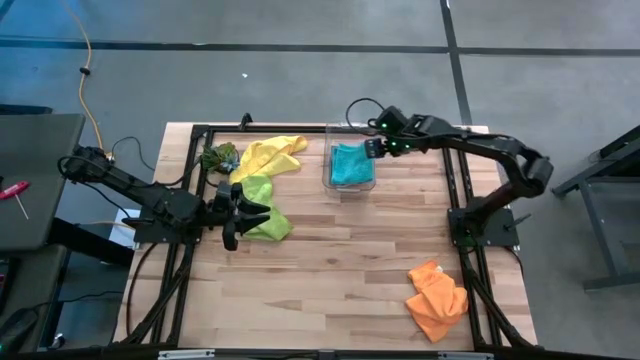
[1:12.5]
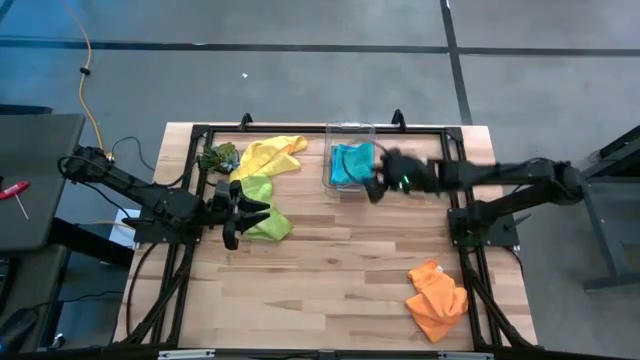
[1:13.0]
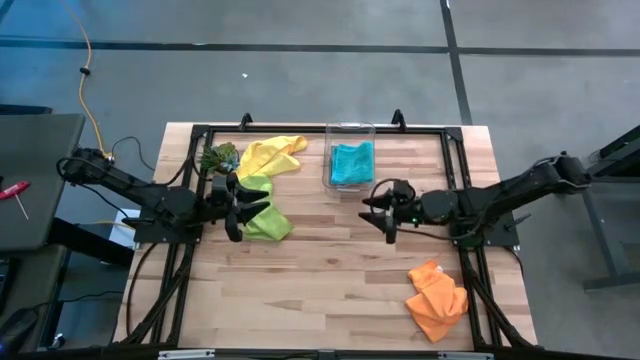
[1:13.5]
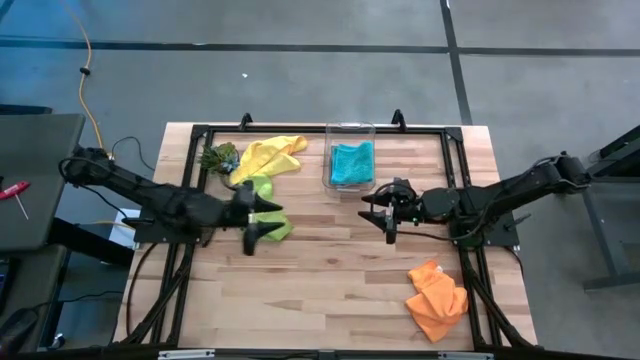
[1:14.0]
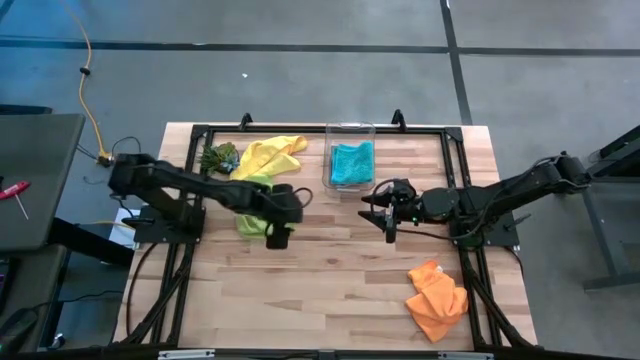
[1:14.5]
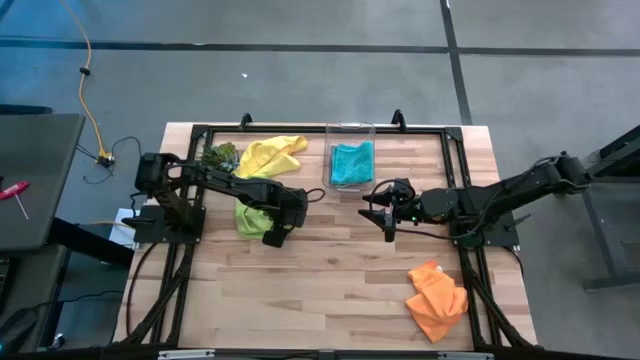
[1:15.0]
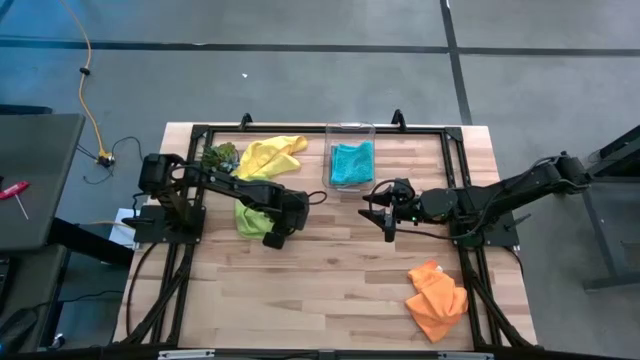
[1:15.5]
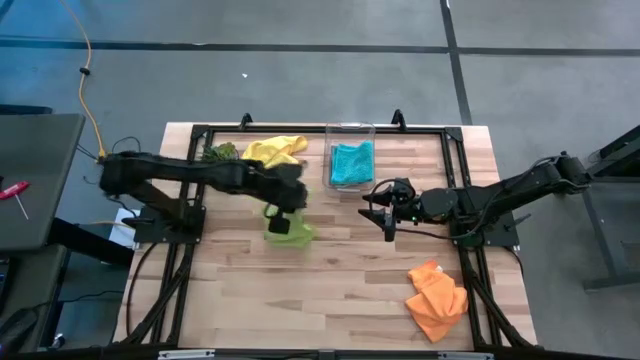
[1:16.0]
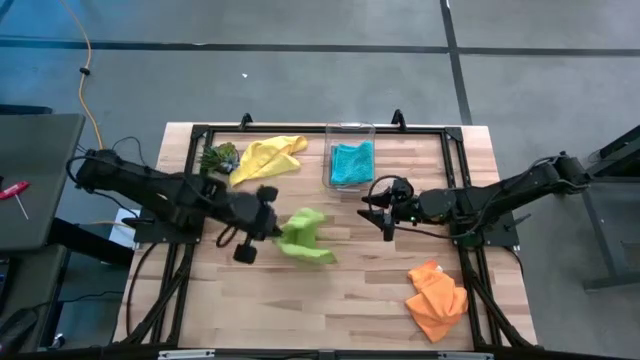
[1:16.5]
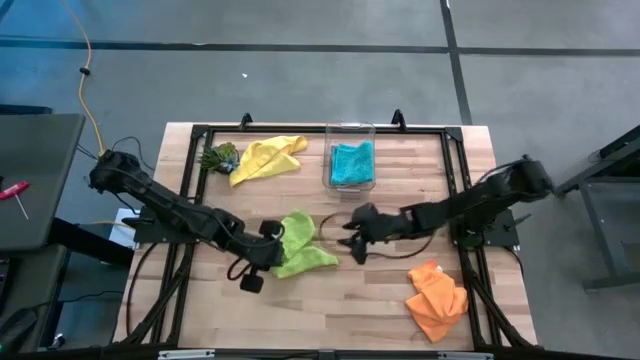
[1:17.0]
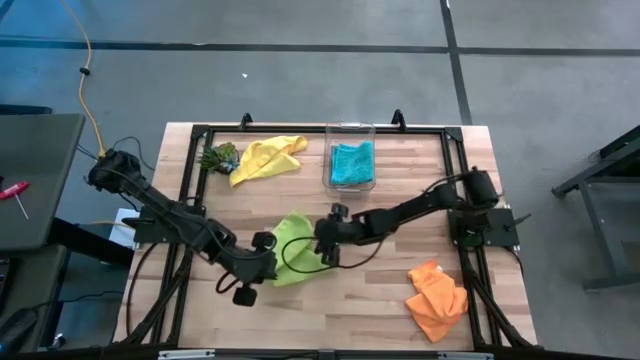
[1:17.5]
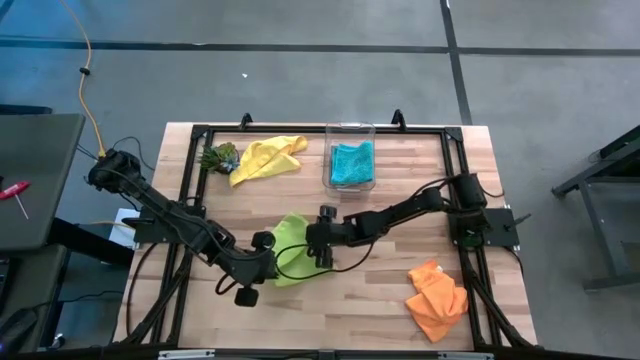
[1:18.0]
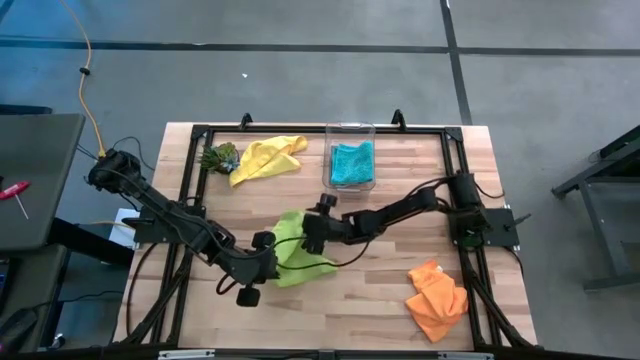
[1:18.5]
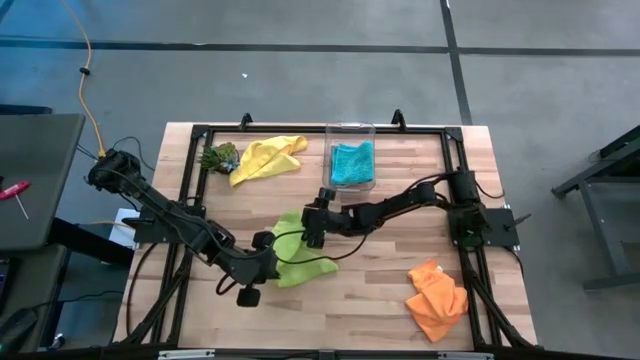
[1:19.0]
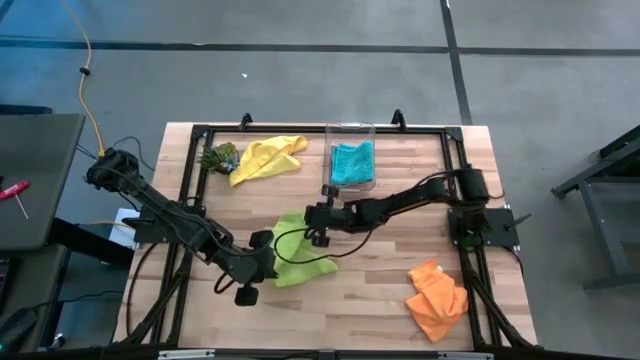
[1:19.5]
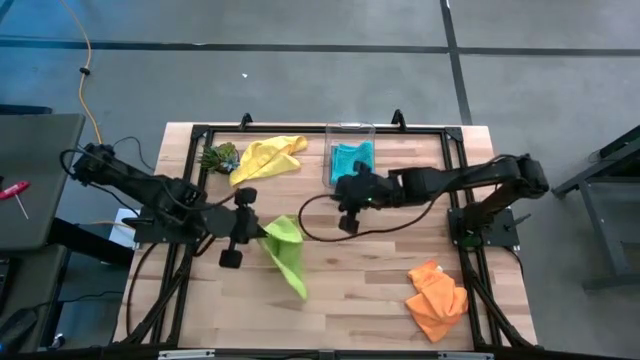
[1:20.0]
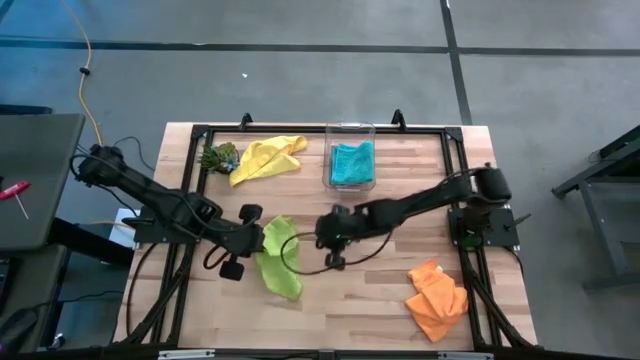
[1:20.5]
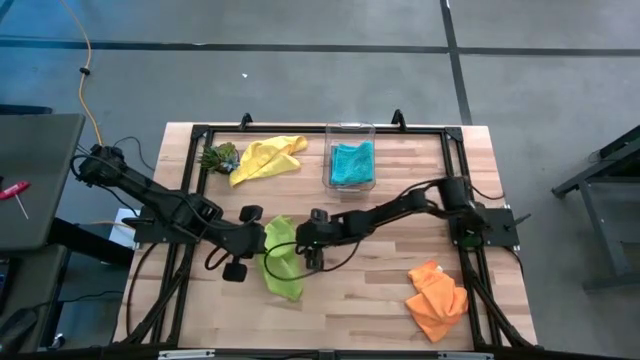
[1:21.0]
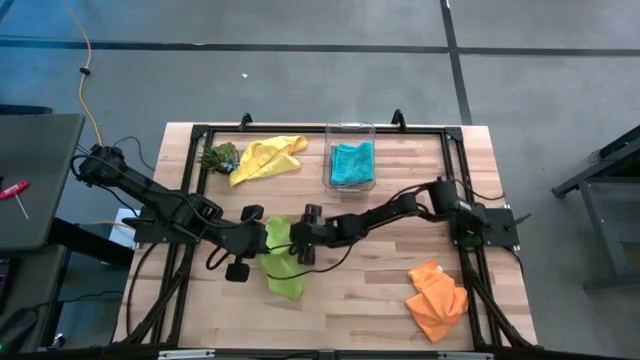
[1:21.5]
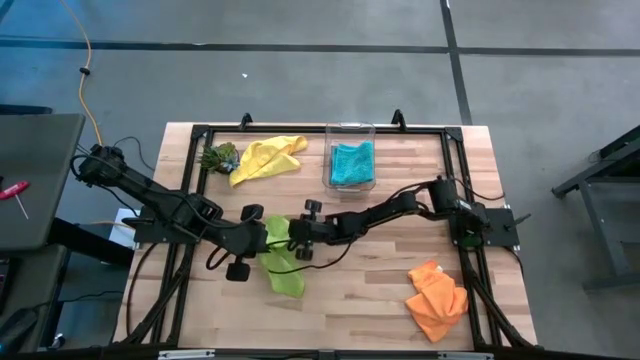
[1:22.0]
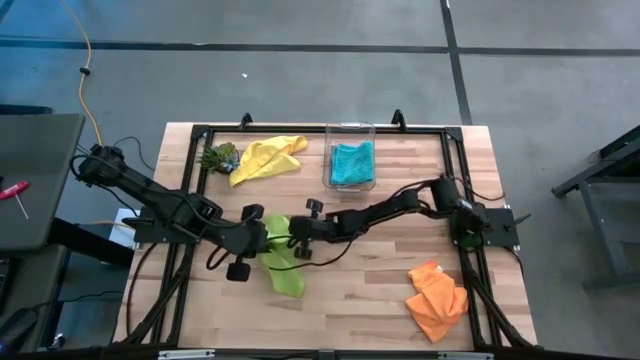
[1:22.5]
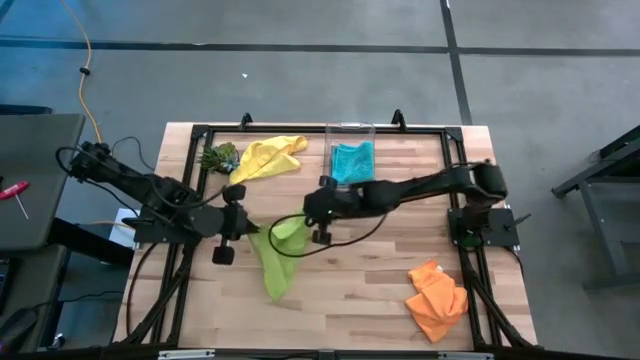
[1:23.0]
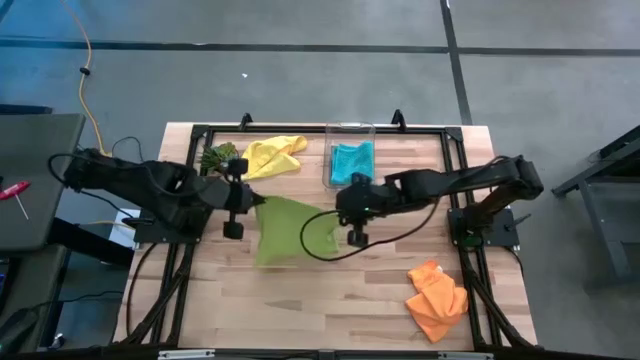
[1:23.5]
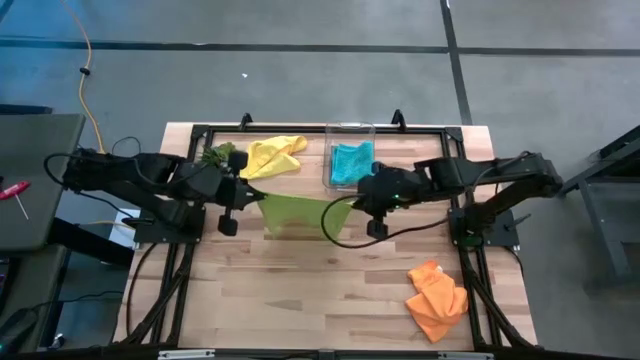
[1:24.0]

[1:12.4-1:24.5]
Task: Fold microfiber towels
Fold the green microfiber cloth

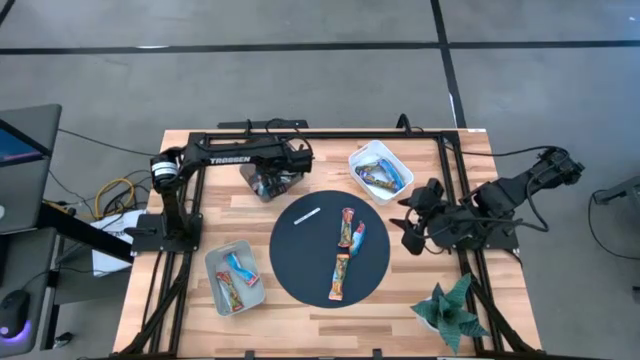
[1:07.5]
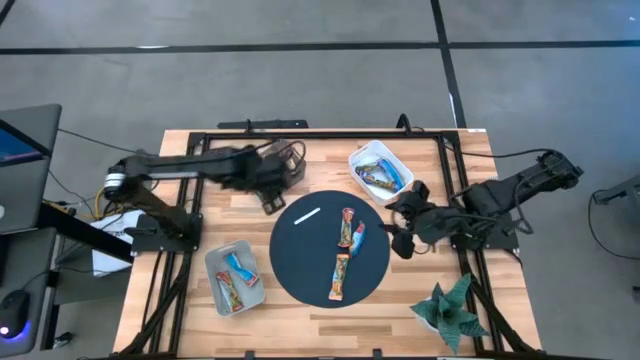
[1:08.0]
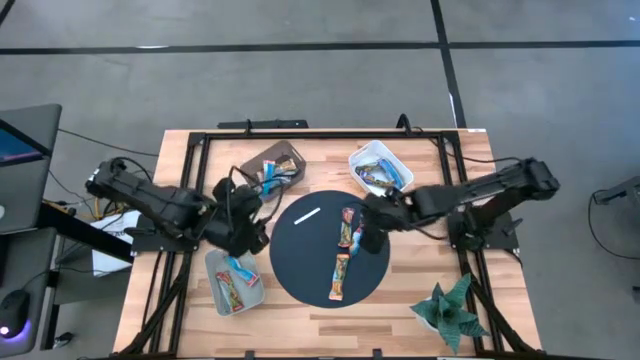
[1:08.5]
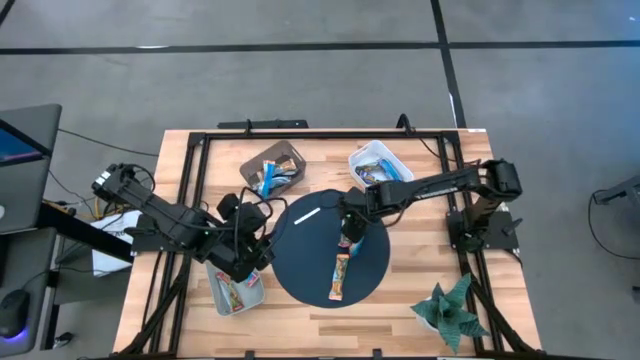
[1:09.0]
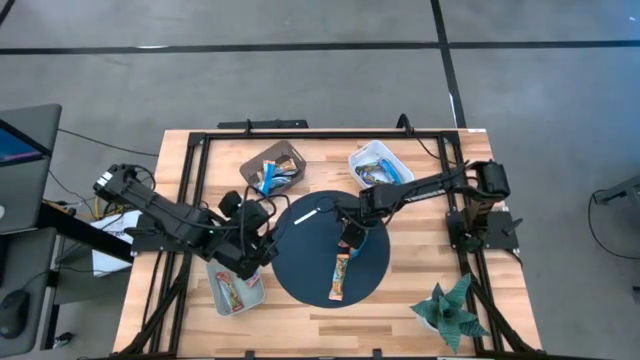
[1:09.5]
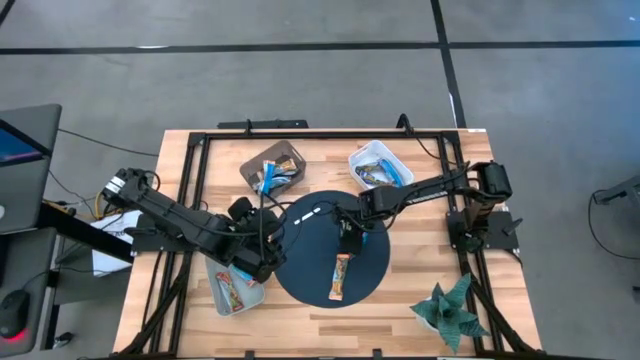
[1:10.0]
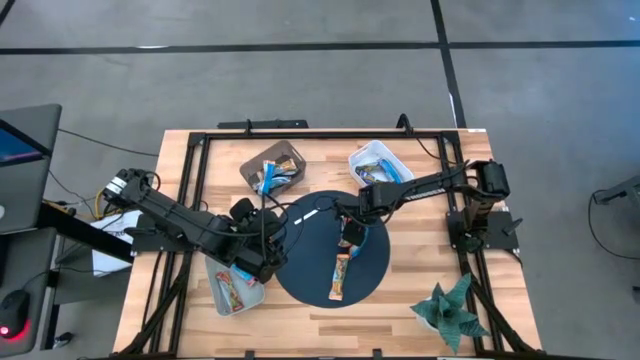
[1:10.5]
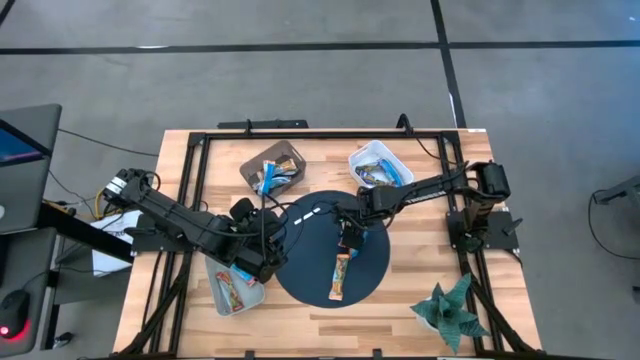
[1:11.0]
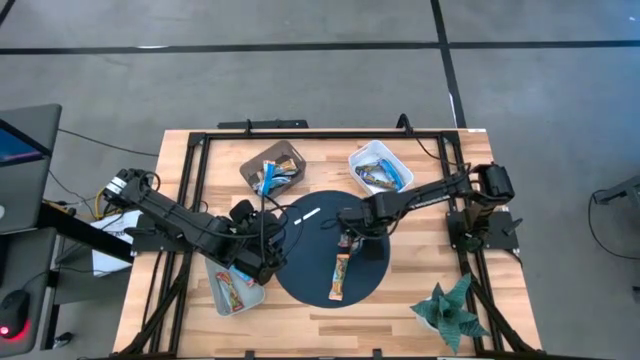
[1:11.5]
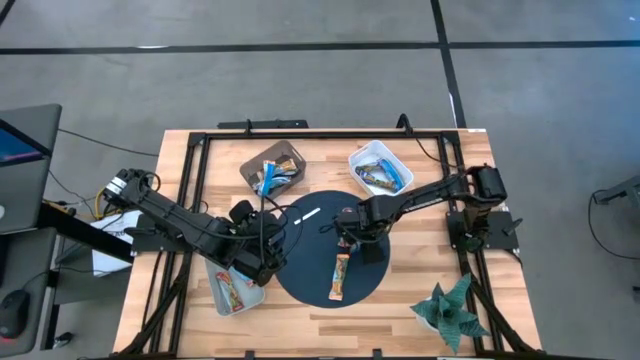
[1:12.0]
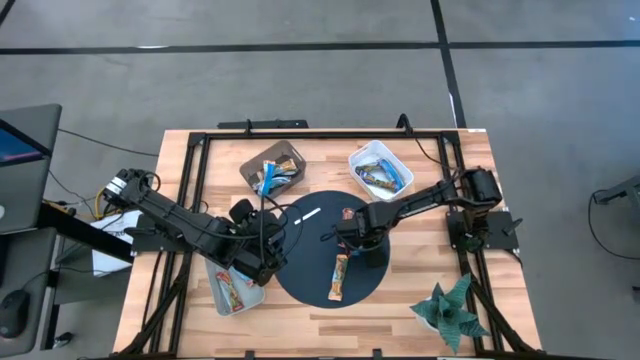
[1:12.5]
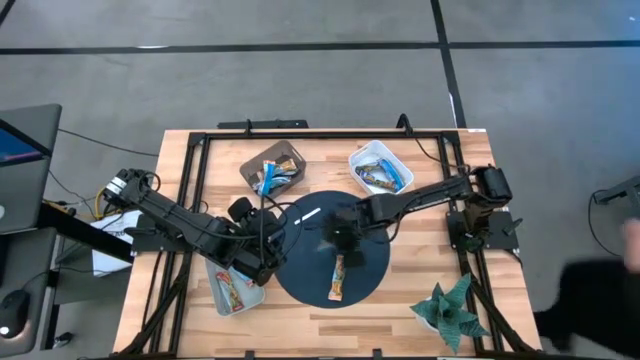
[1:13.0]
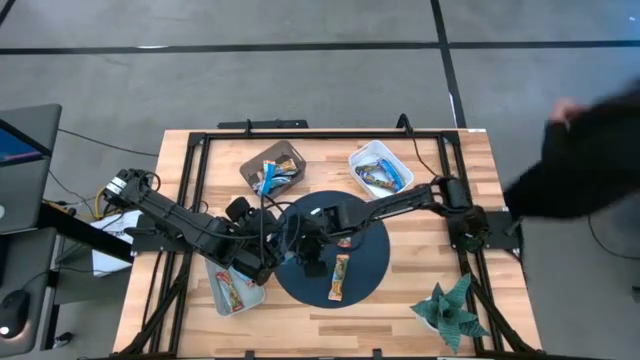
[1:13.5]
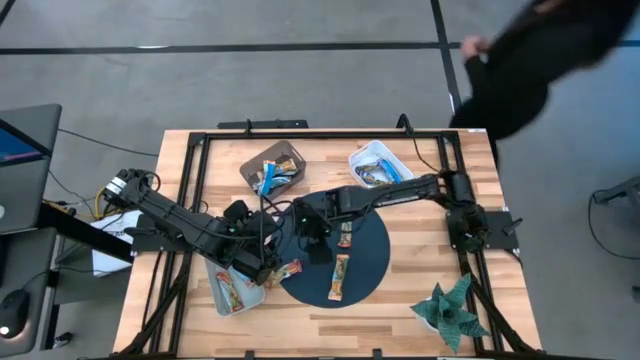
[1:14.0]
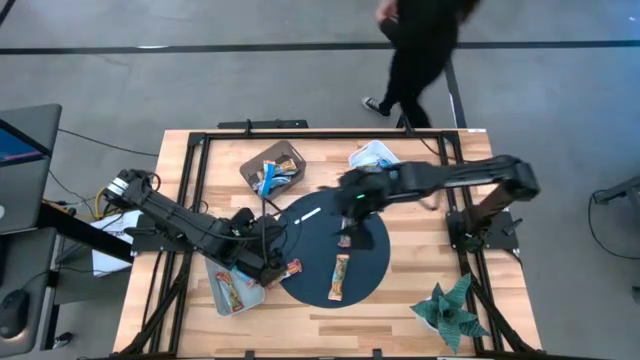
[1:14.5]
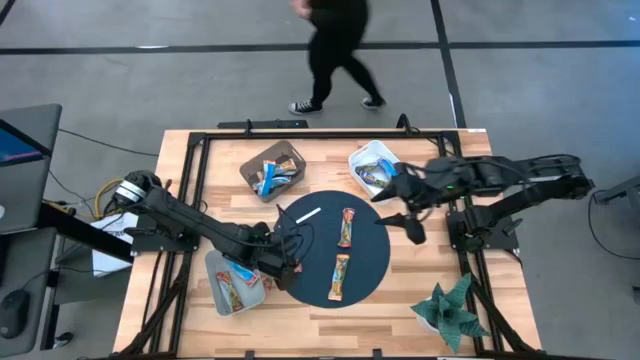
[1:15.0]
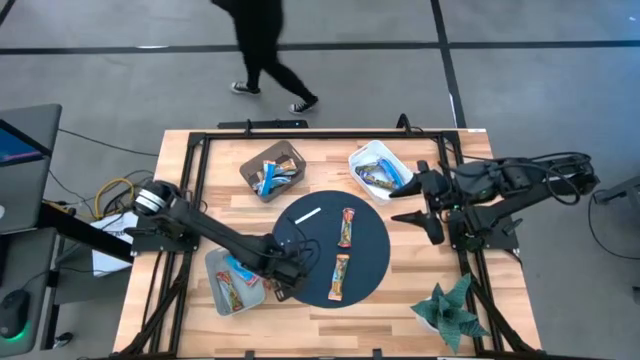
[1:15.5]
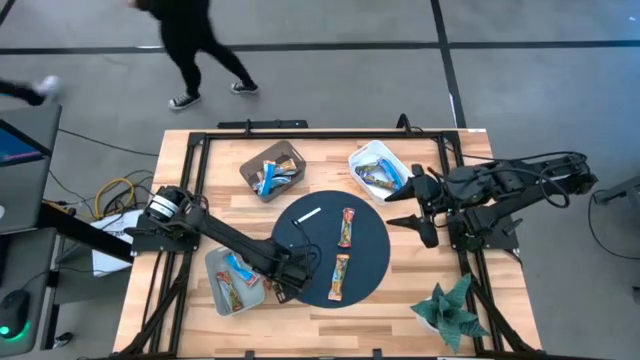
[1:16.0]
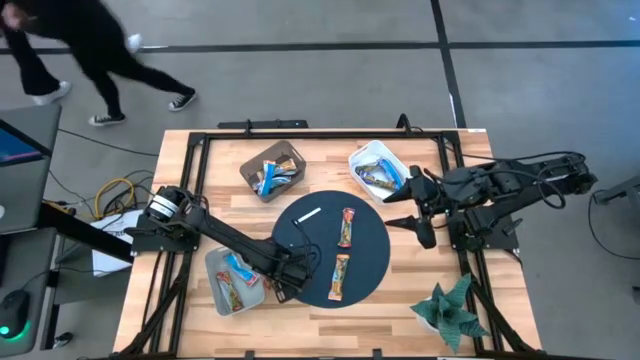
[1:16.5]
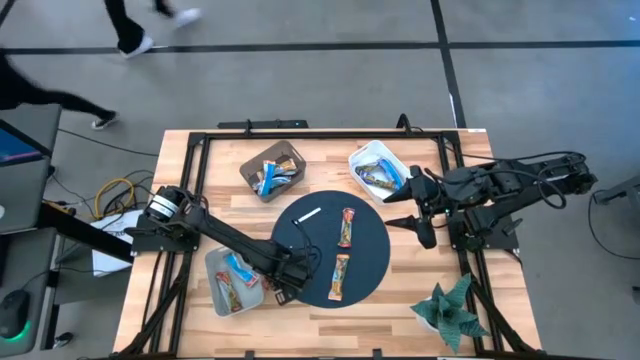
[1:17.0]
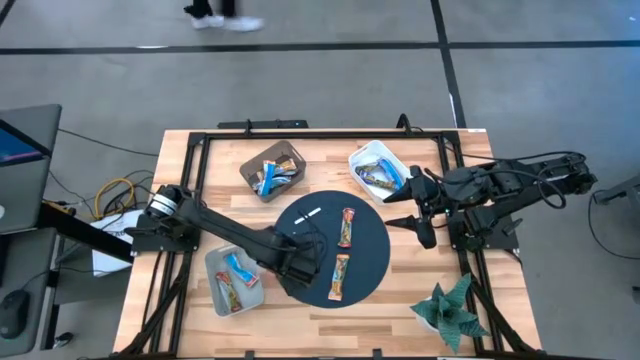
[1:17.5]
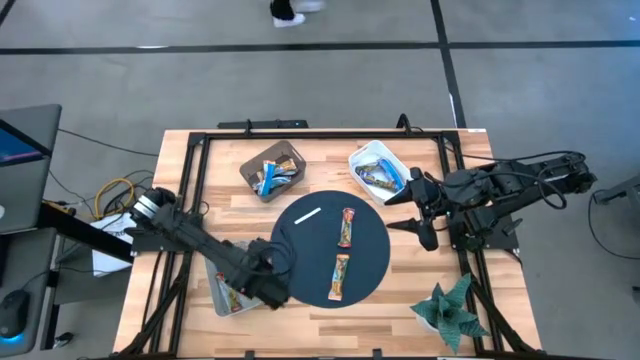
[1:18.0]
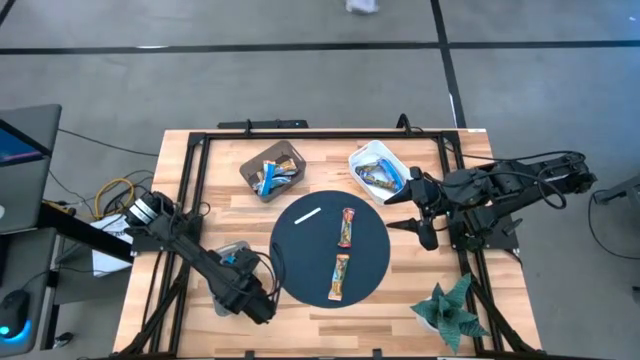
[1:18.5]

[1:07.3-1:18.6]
Task: Pick and place Granola Bars by type
Put the red granola bar into the gray bin
